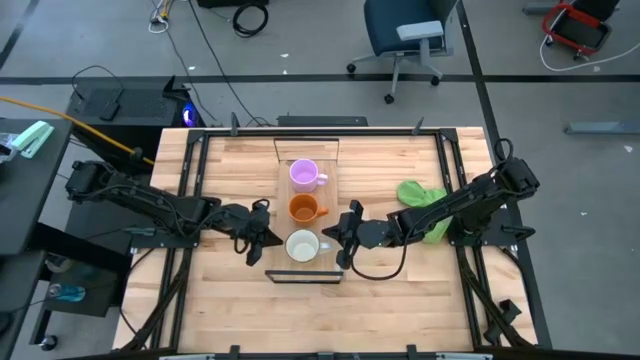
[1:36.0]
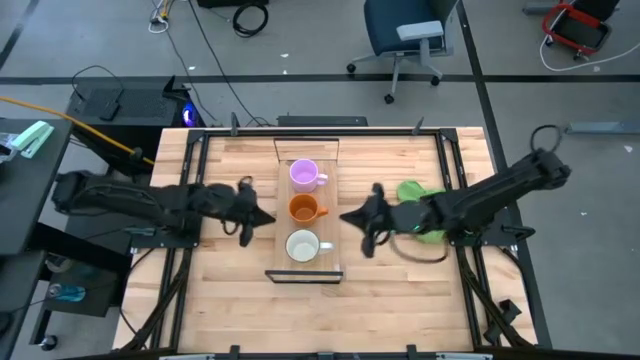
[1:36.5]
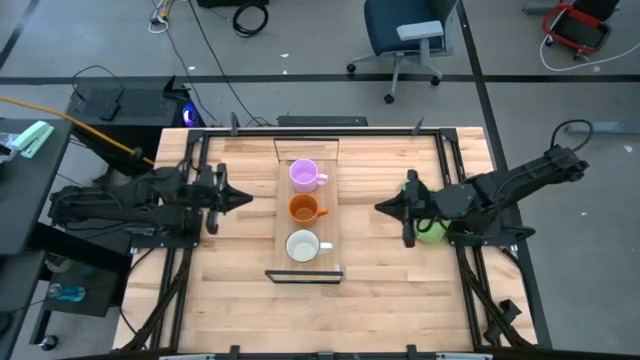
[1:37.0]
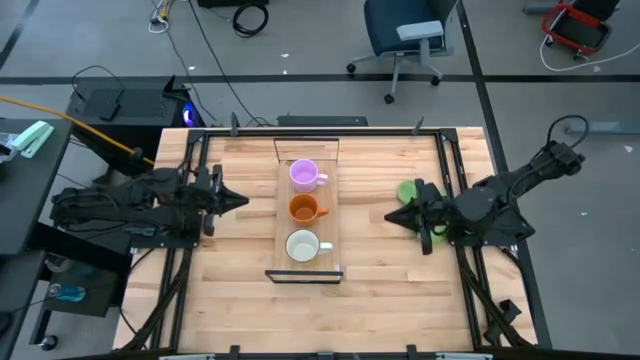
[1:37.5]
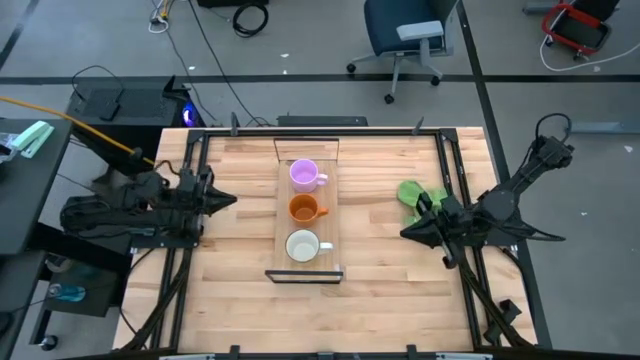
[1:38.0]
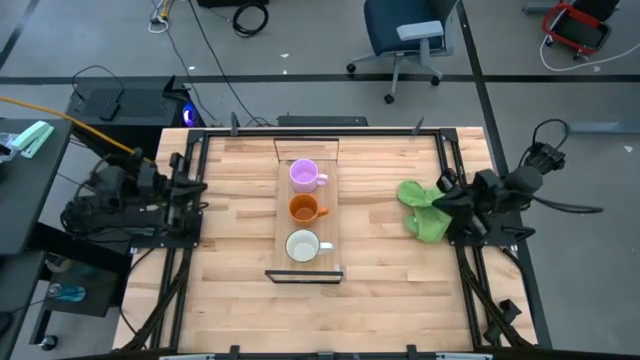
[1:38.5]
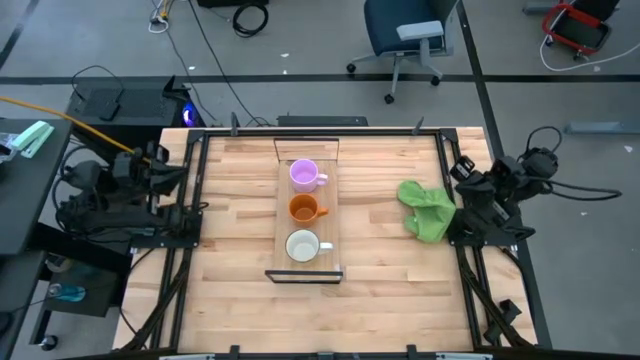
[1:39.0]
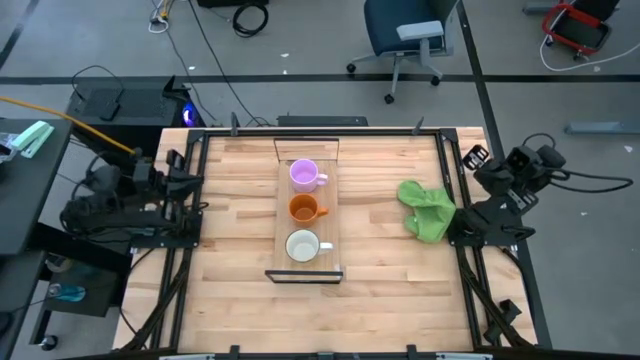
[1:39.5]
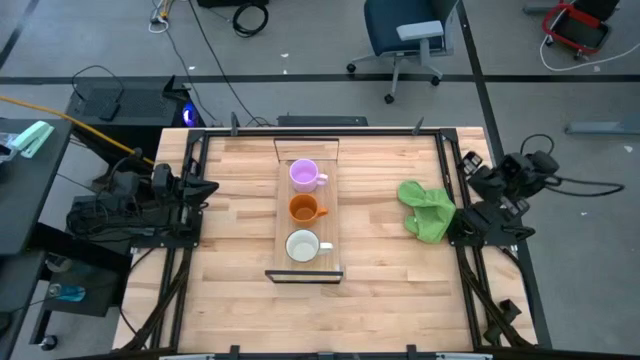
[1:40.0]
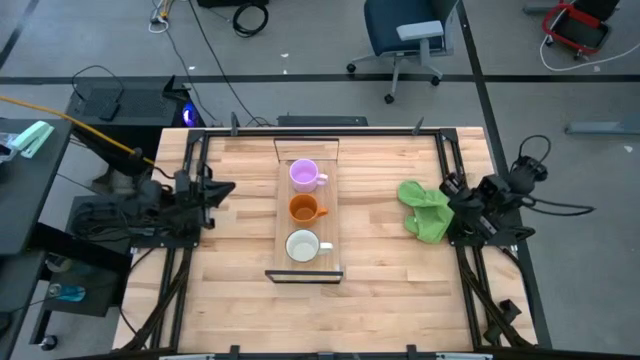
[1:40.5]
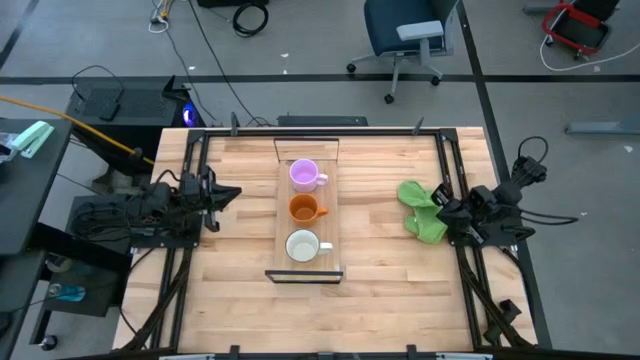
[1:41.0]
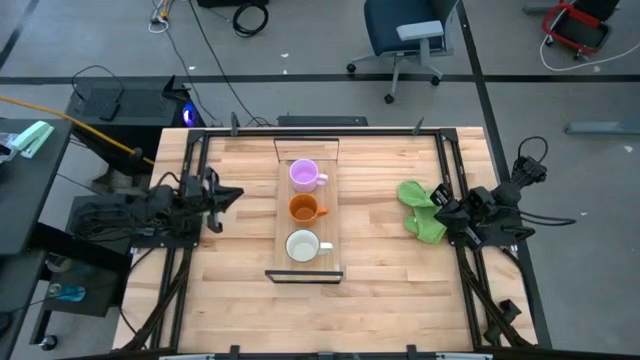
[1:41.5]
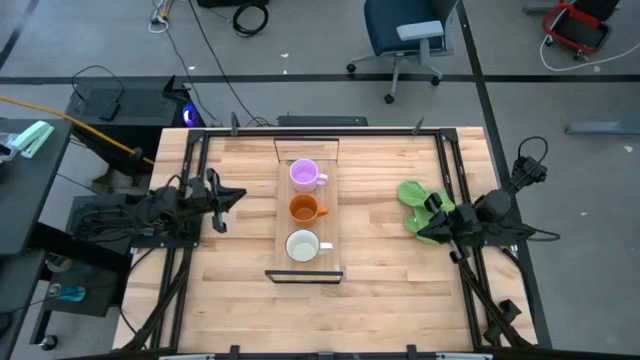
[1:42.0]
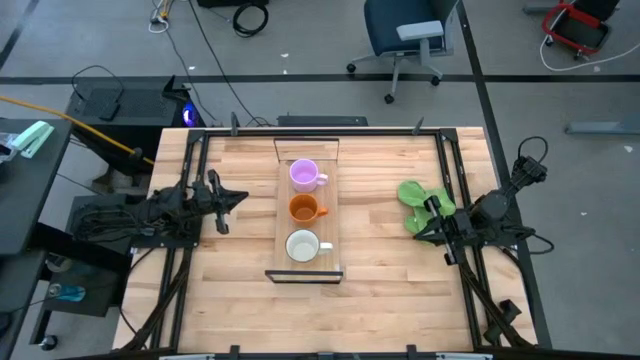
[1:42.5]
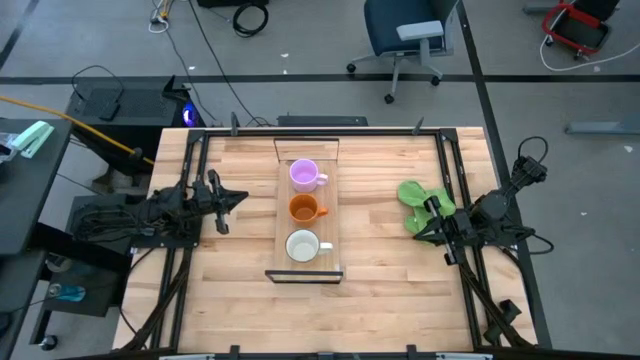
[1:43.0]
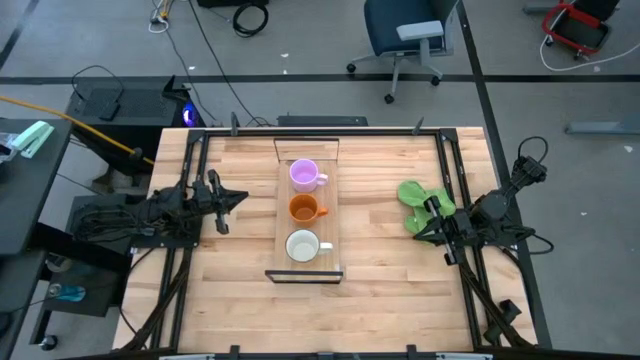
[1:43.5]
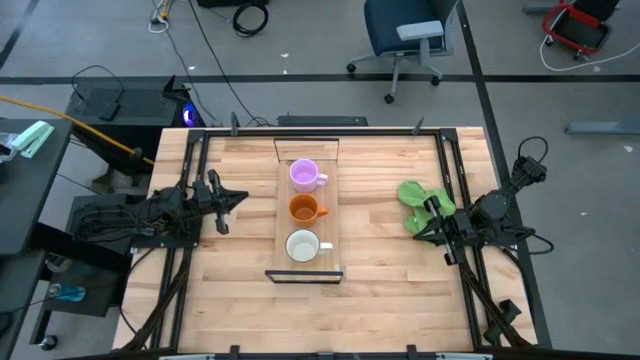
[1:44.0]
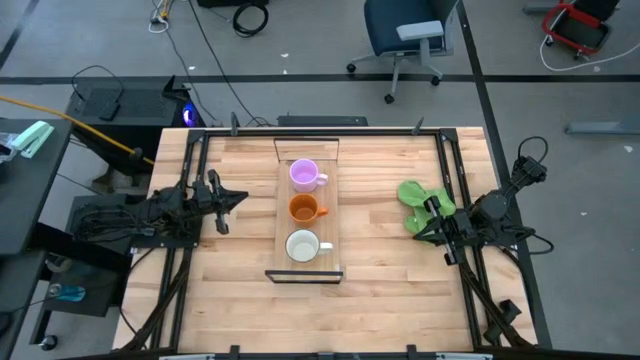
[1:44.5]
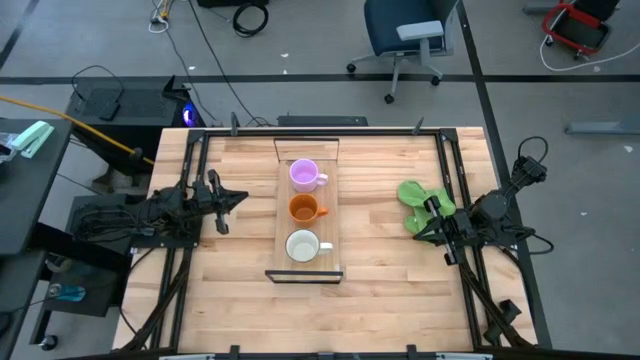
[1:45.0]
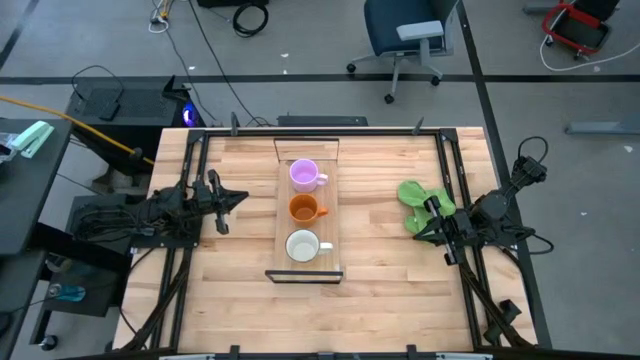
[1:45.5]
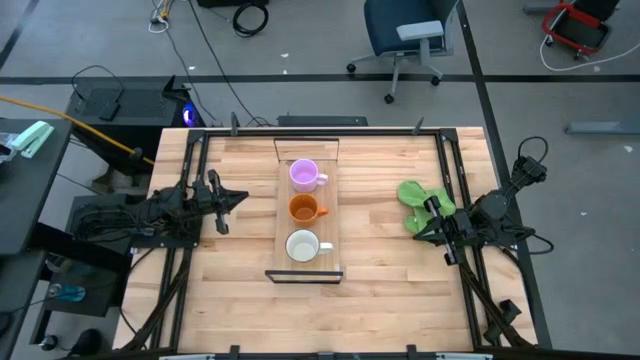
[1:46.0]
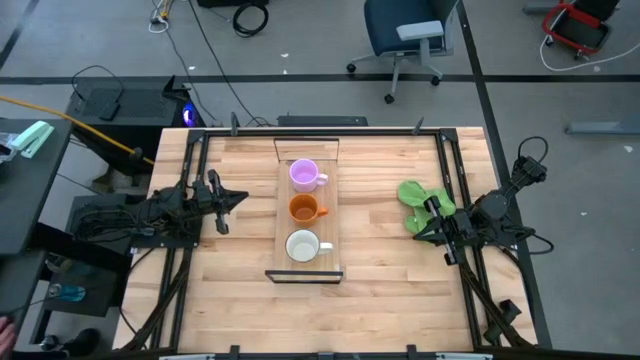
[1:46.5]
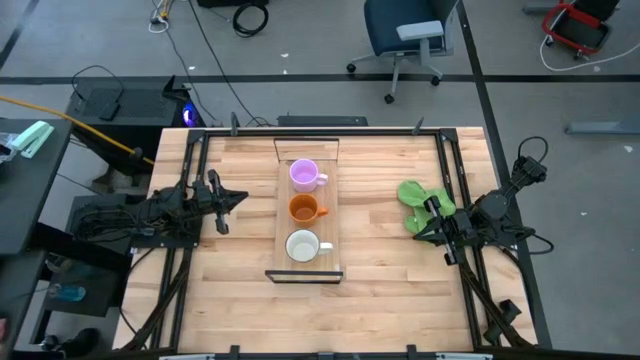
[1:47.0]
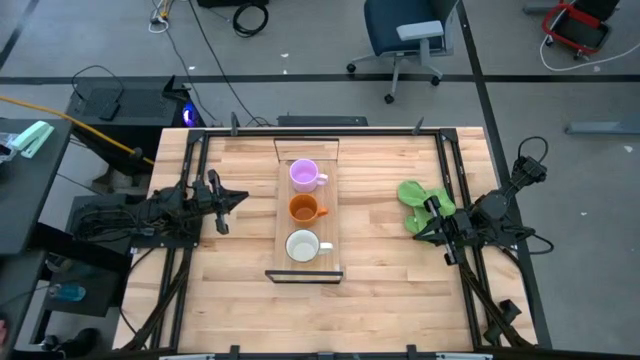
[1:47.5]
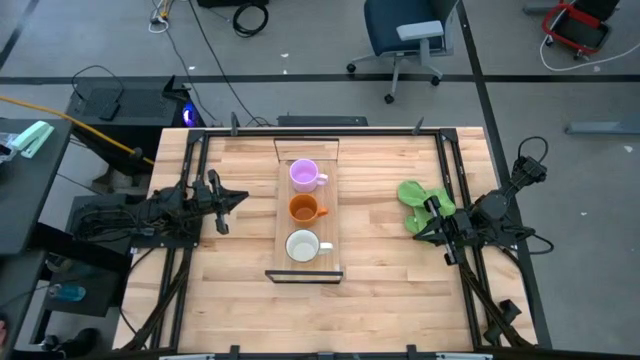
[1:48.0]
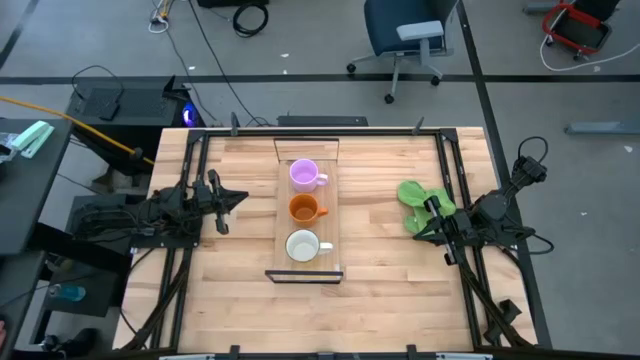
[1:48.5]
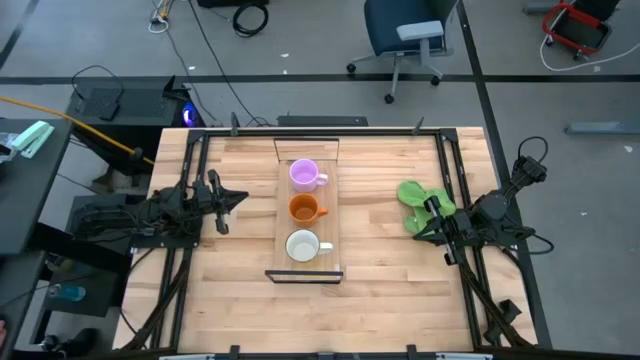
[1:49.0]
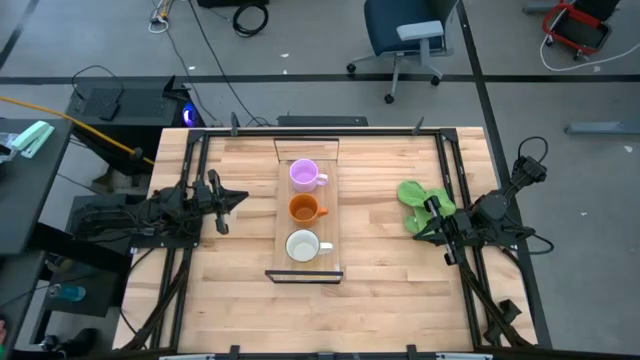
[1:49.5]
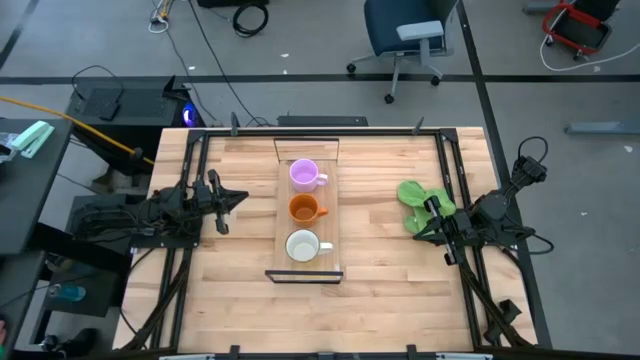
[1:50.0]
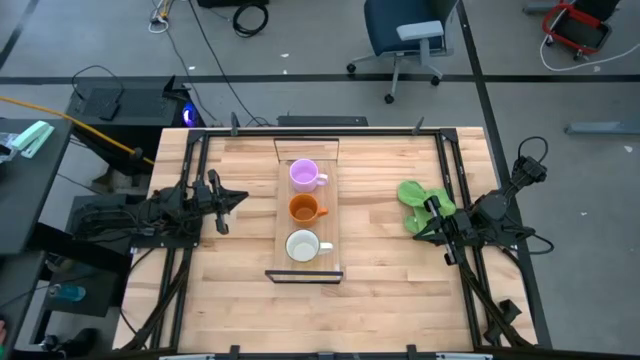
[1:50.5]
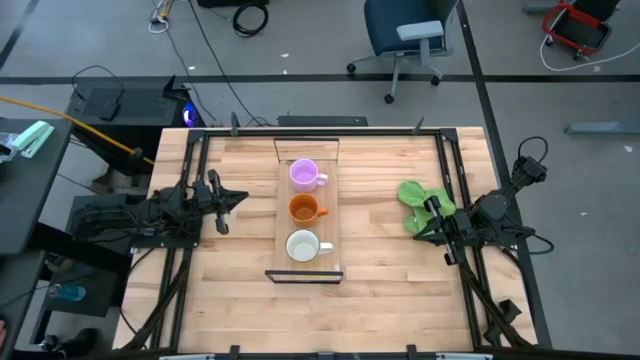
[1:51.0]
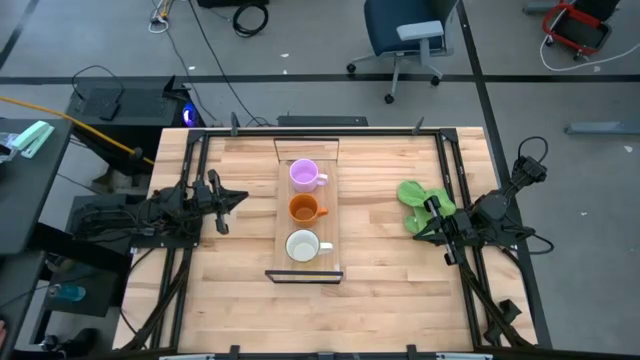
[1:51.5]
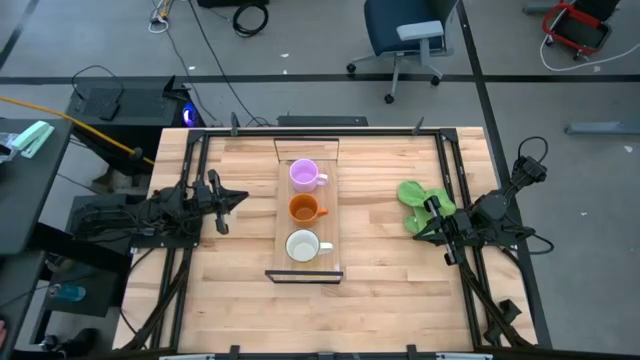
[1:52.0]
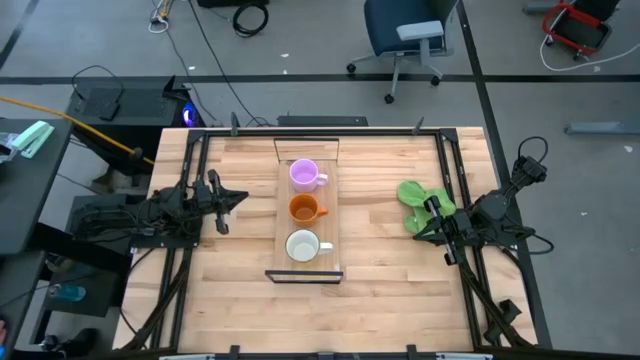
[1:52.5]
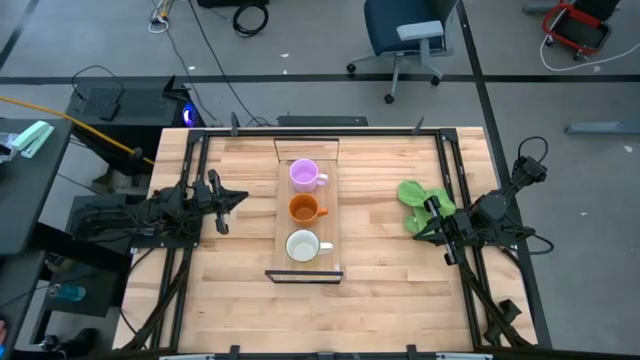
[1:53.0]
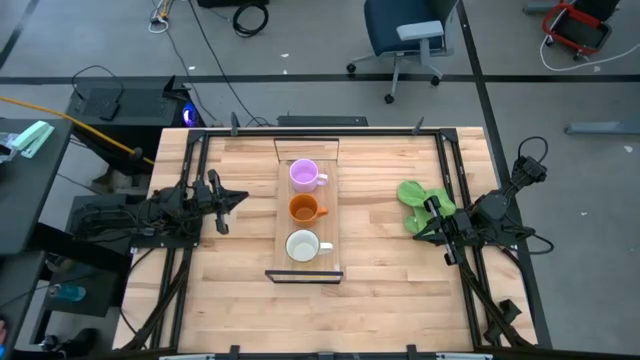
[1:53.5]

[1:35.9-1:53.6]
Task: Stack small to large cups/mugs on shelf
Return to Home Position

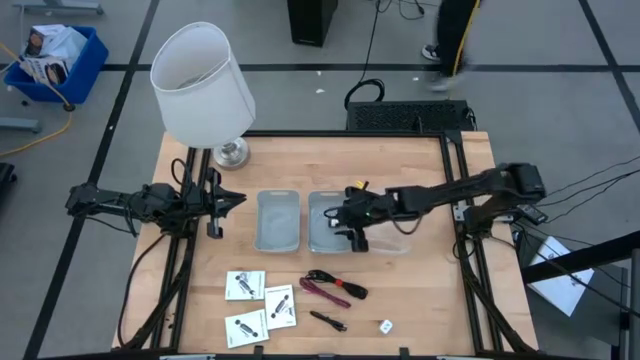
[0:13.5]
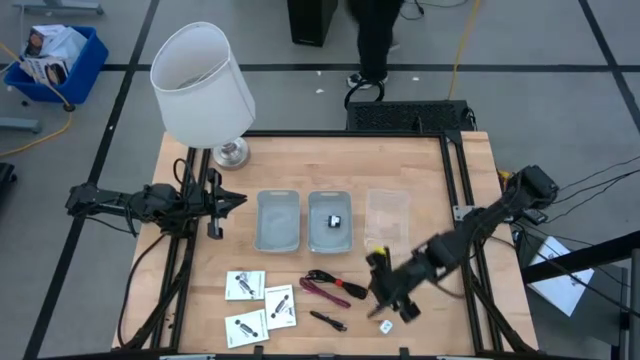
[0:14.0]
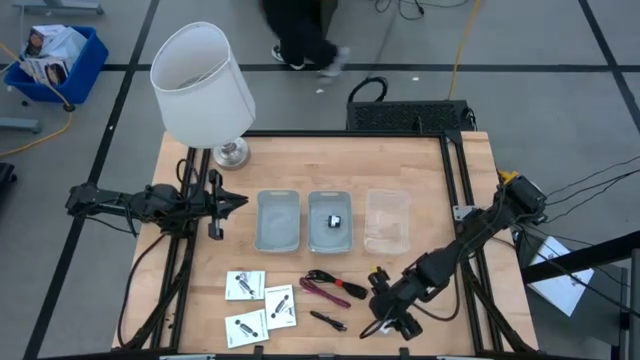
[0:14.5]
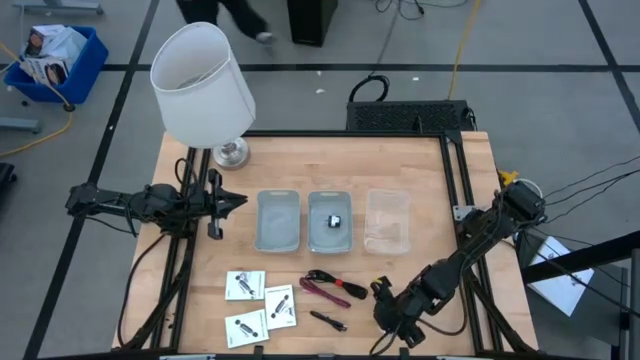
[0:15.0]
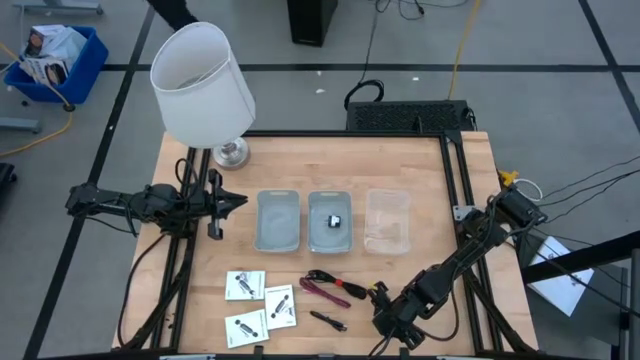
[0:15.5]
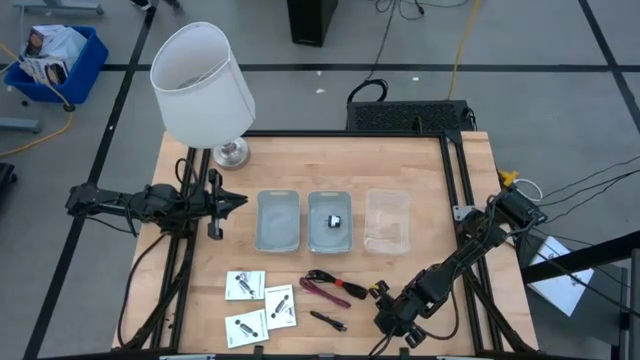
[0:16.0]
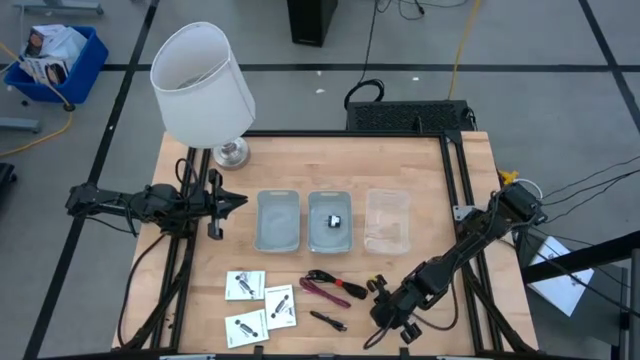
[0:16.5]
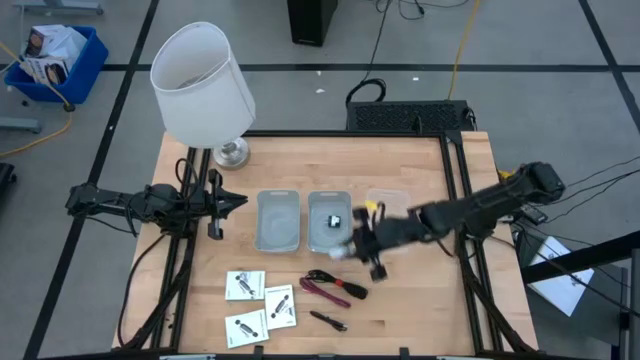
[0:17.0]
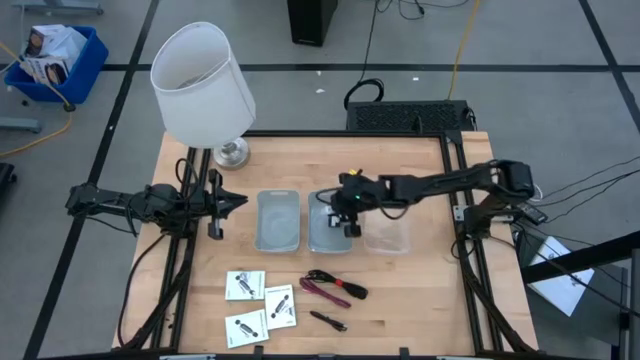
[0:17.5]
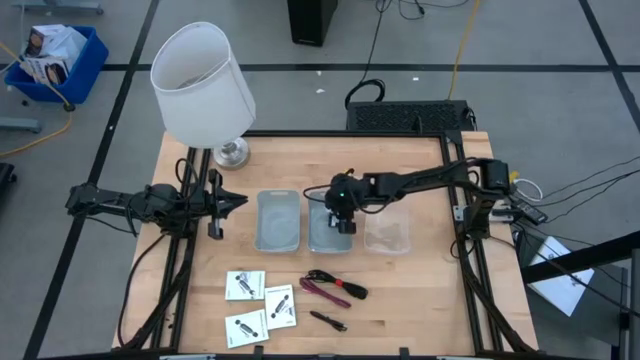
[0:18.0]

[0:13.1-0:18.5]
Task: Pick and place items into bin
Put the white charger adapter into the right gray bin
